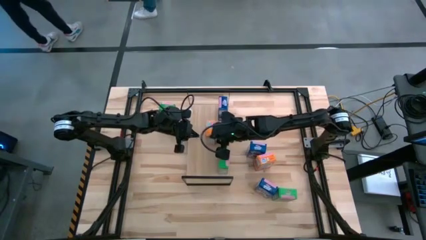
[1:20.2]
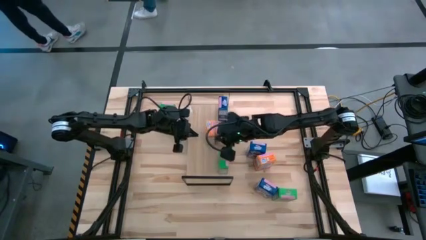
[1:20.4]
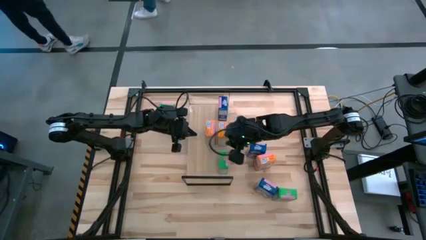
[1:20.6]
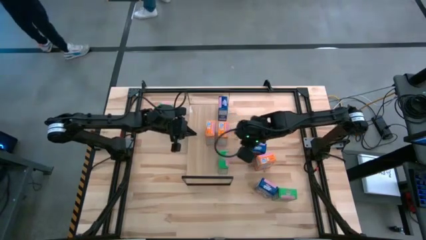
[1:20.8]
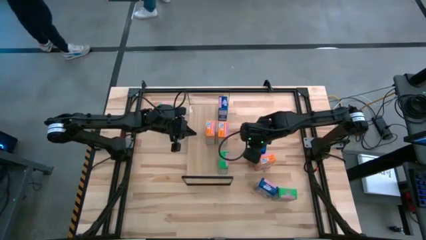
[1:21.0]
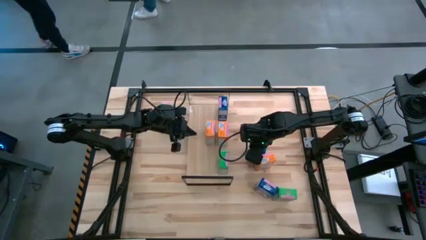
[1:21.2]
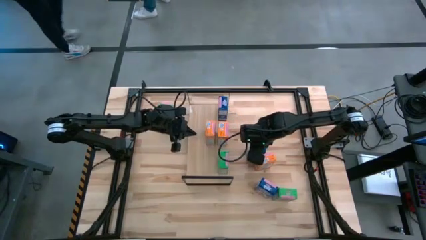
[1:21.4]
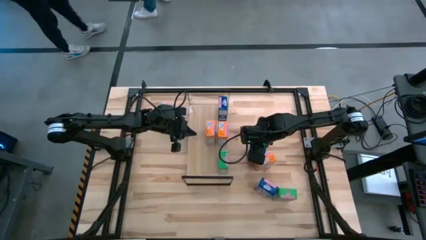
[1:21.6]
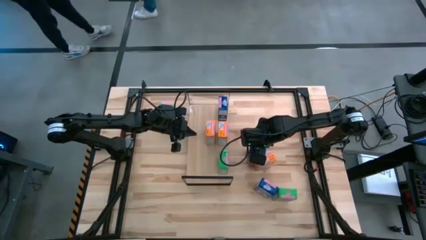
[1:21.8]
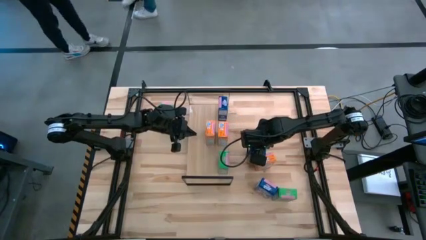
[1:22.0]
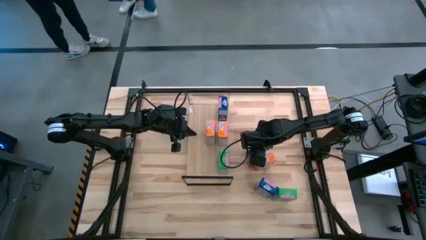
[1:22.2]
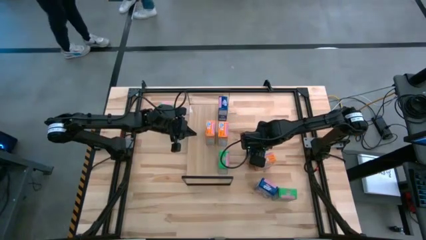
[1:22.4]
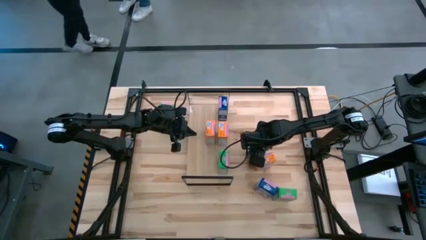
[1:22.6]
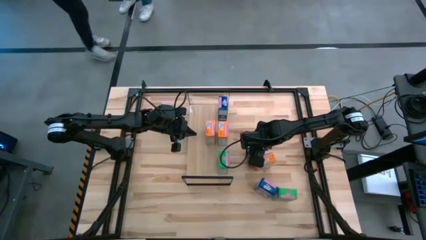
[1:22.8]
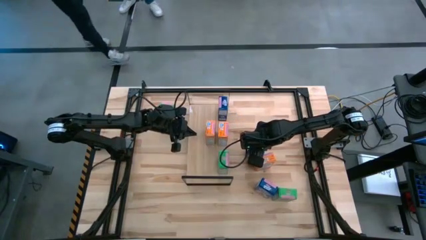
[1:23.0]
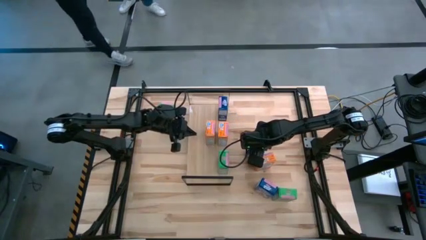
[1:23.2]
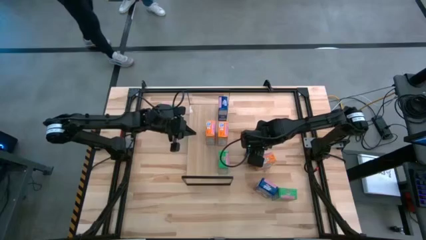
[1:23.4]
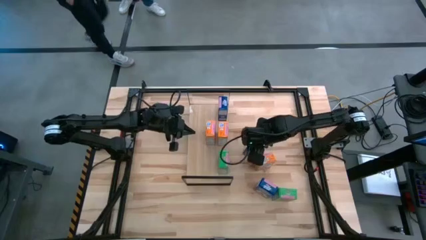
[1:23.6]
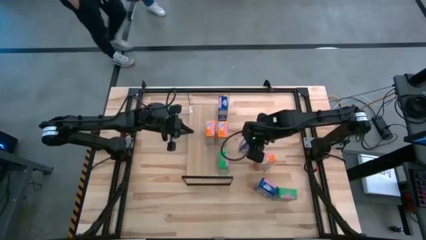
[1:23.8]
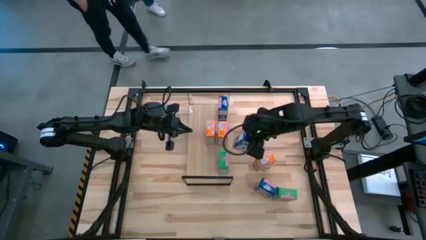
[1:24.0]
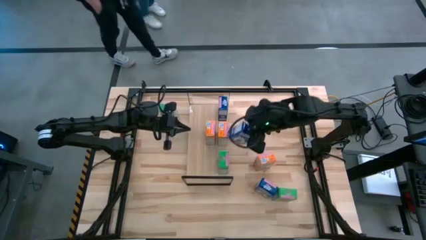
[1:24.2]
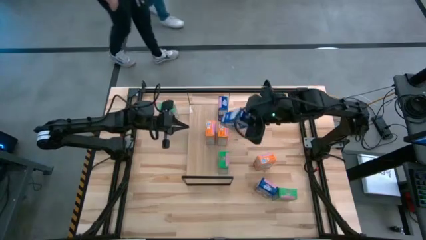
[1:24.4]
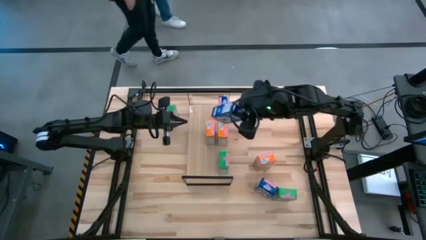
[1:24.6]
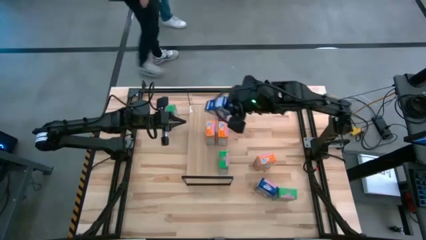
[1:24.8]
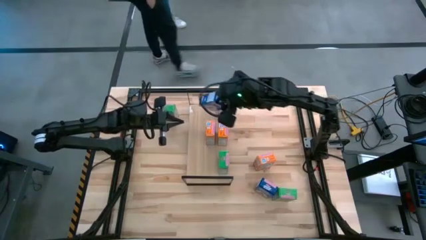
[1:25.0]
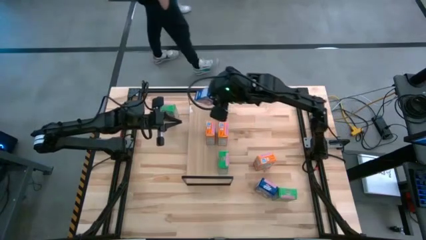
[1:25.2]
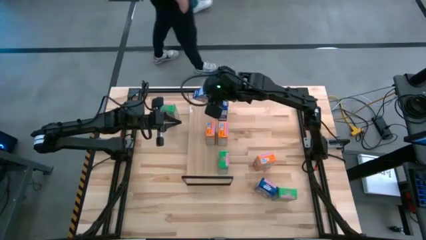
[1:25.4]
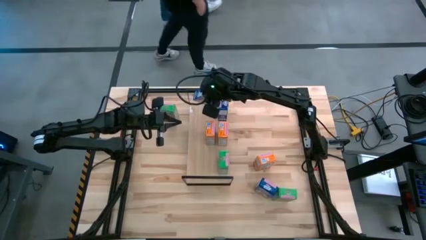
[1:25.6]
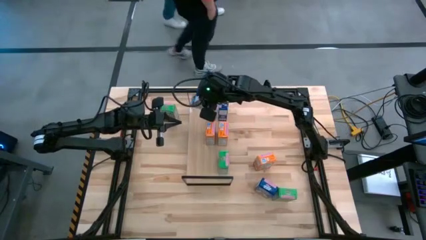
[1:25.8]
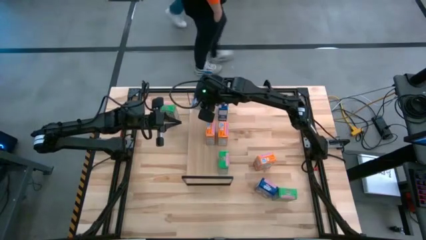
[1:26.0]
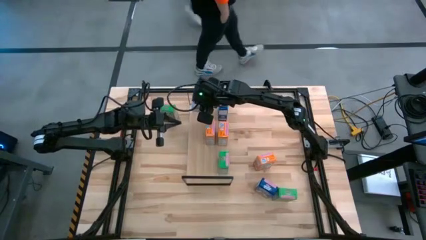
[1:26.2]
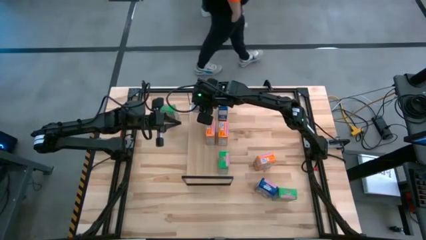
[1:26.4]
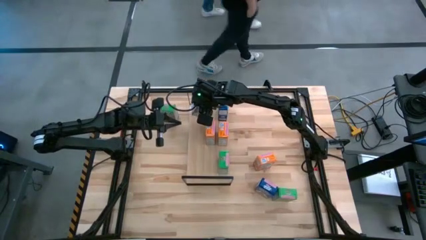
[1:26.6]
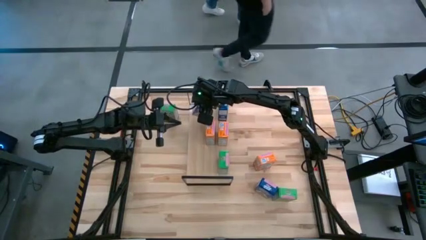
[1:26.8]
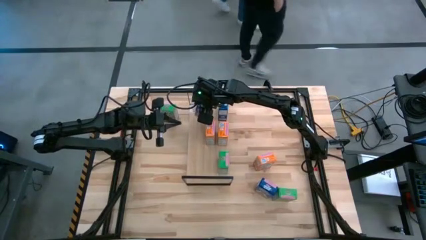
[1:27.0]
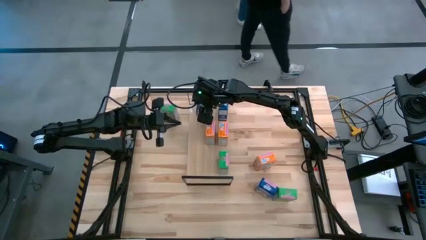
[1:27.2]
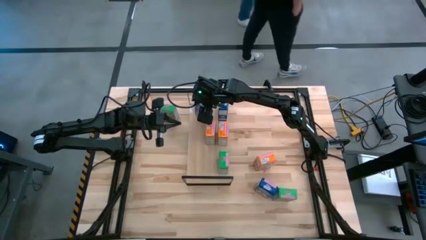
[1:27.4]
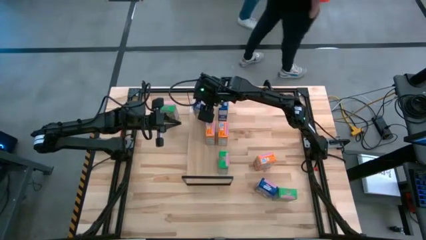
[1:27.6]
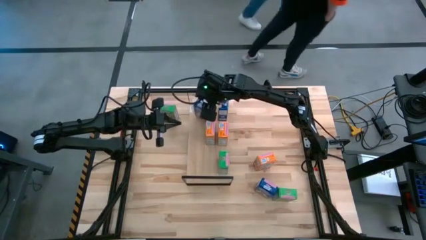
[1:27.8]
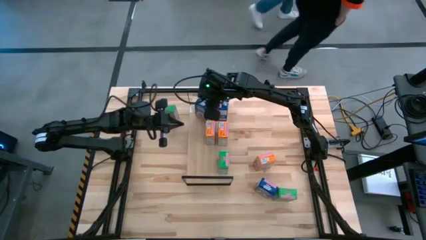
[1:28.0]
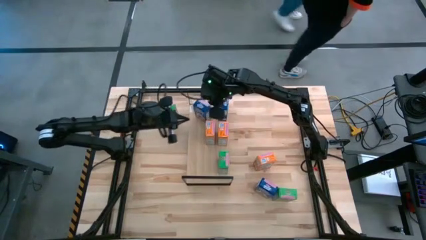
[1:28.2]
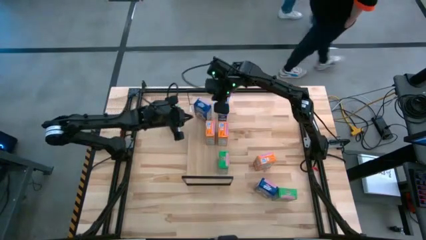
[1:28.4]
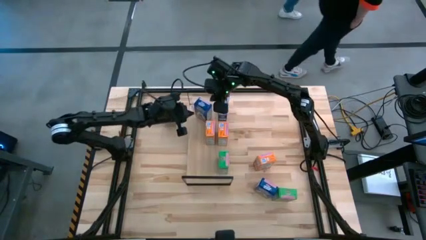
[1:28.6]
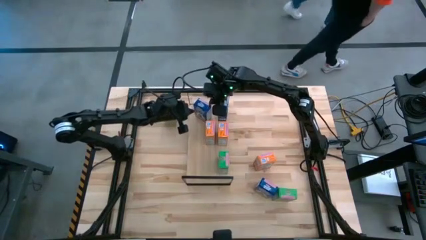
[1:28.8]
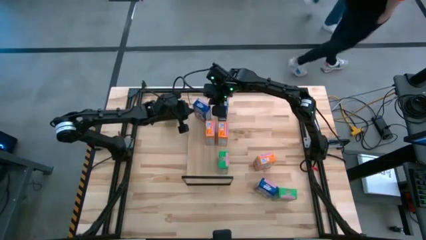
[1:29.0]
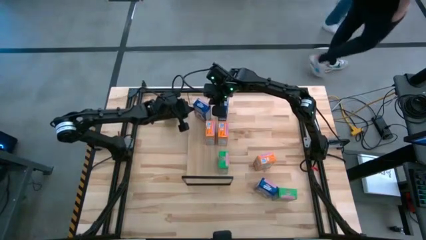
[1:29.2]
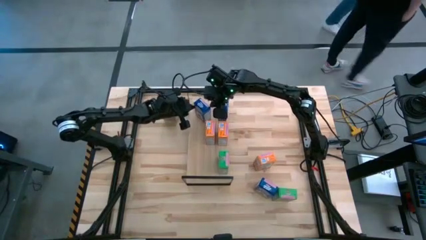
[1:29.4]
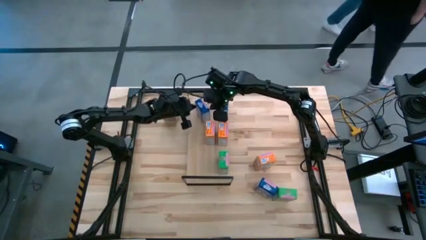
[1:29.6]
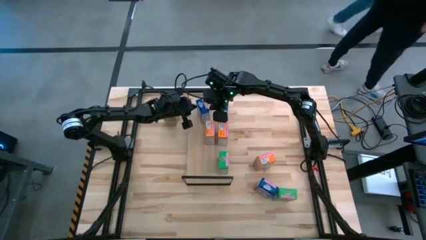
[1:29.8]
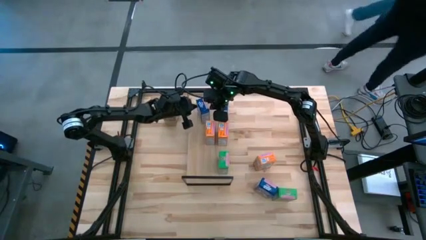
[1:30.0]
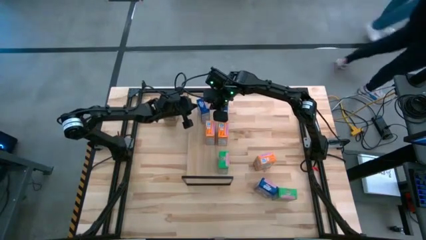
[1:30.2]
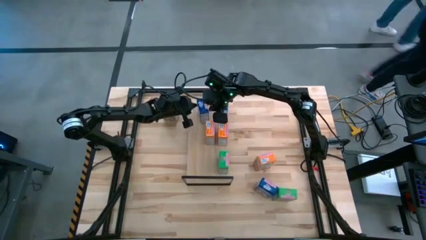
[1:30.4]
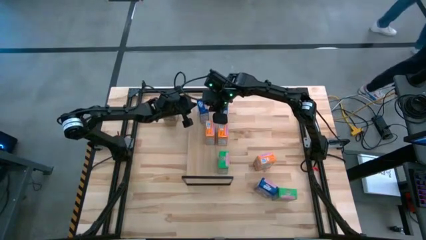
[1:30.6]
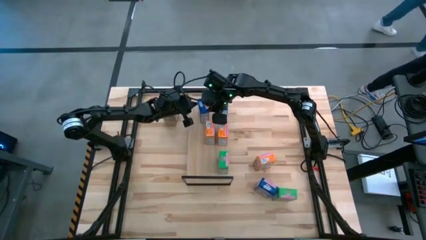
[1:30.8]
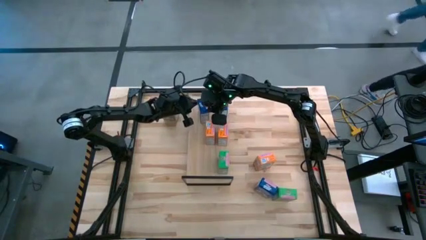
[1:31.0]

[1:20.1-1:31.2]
Task: Stack cereal on shelf
Put the top blue cereal box on the shelf aligned with the other blue cereal box

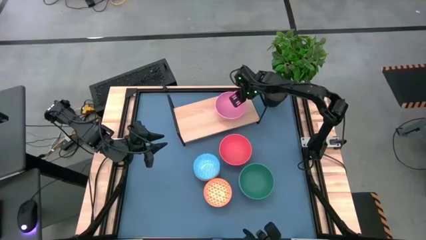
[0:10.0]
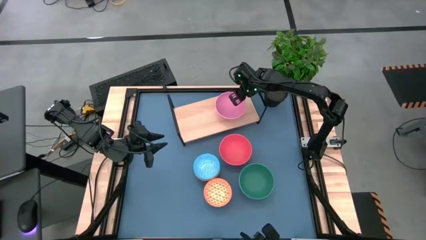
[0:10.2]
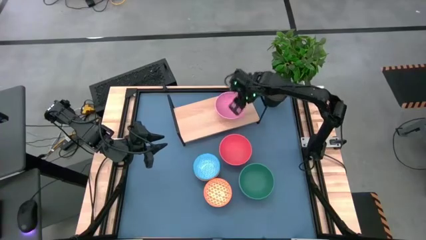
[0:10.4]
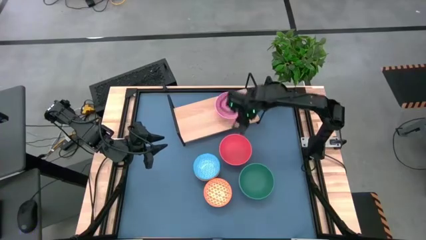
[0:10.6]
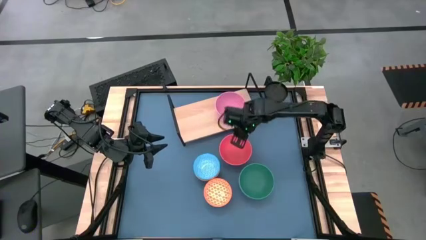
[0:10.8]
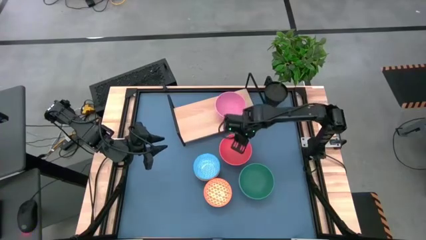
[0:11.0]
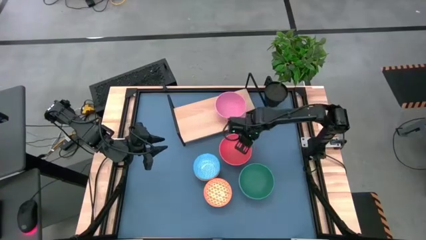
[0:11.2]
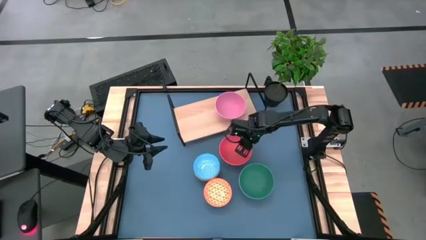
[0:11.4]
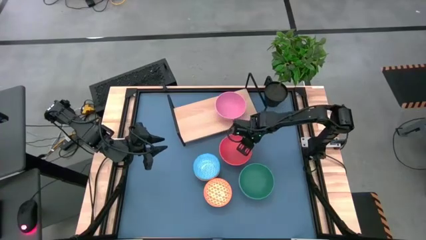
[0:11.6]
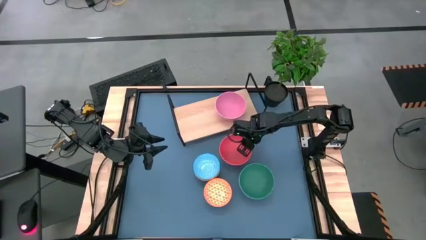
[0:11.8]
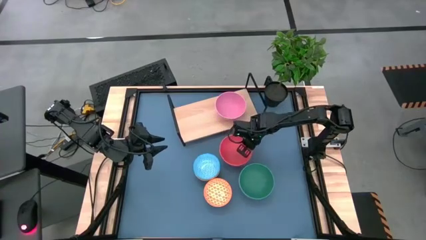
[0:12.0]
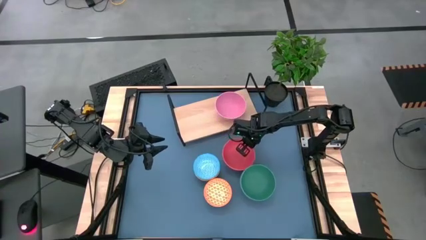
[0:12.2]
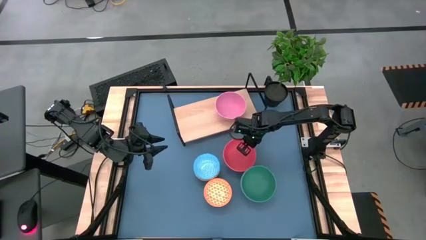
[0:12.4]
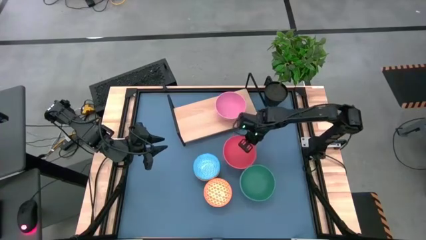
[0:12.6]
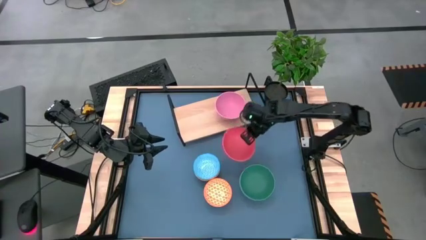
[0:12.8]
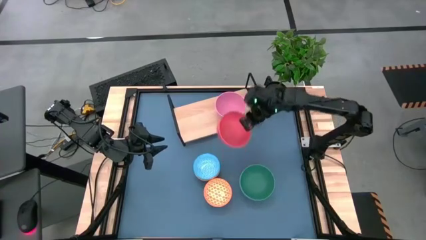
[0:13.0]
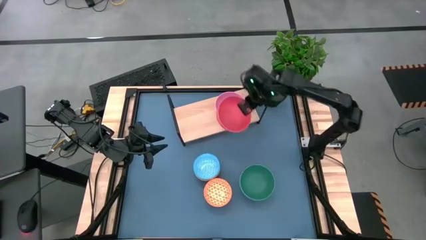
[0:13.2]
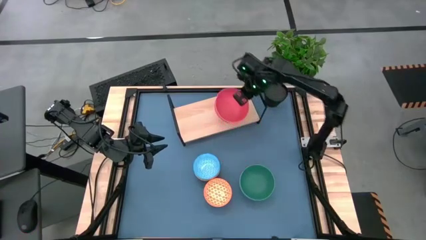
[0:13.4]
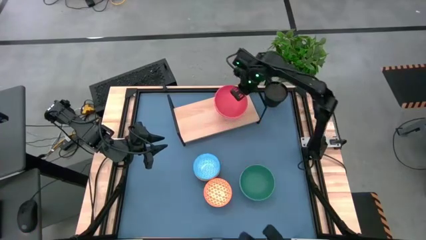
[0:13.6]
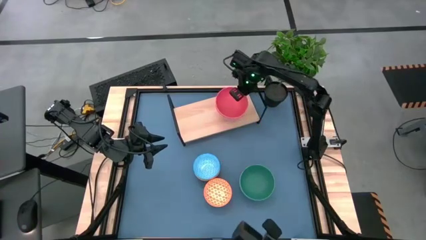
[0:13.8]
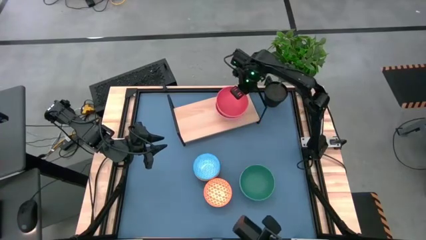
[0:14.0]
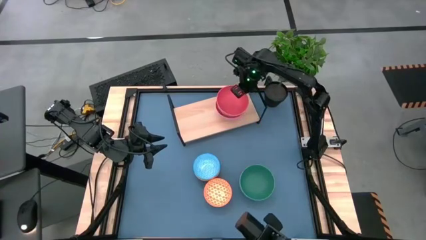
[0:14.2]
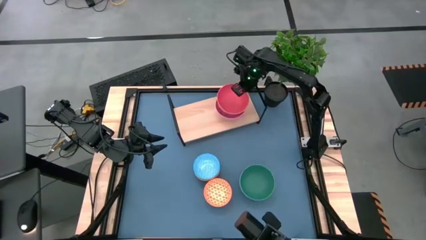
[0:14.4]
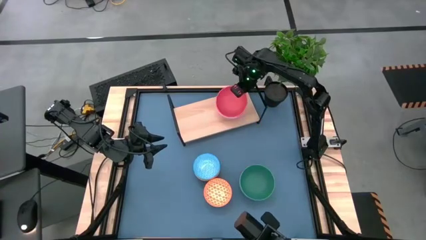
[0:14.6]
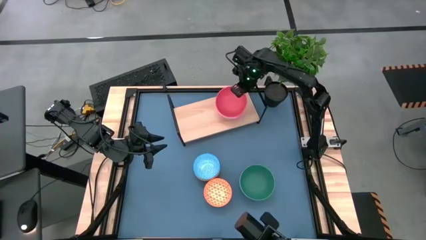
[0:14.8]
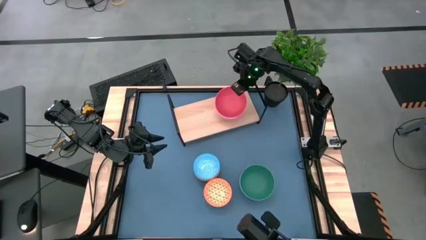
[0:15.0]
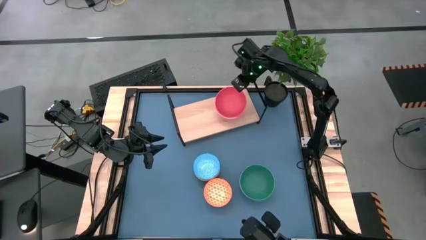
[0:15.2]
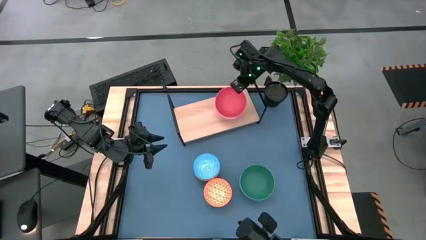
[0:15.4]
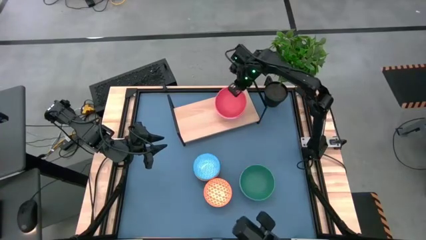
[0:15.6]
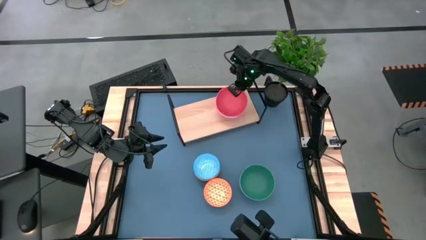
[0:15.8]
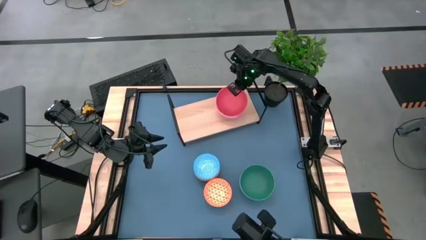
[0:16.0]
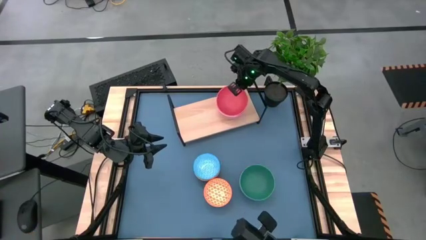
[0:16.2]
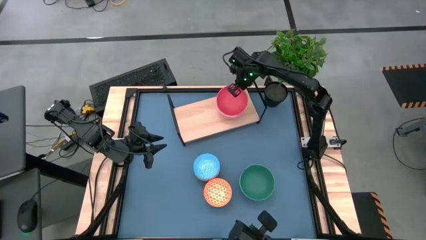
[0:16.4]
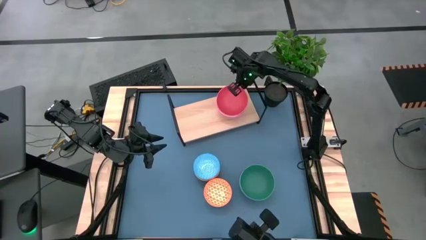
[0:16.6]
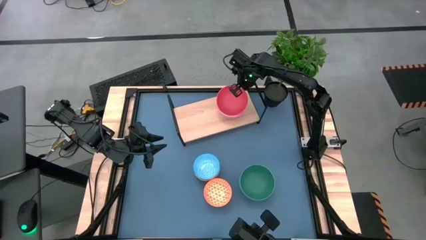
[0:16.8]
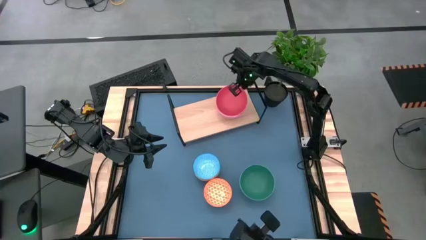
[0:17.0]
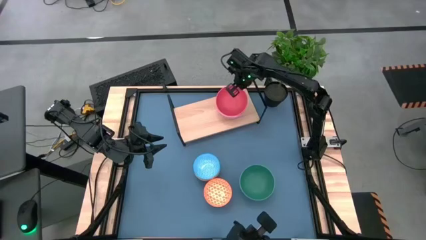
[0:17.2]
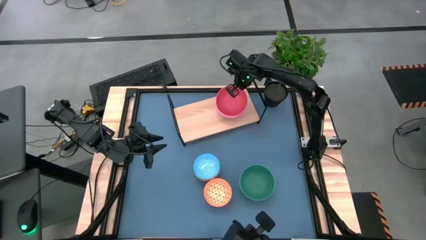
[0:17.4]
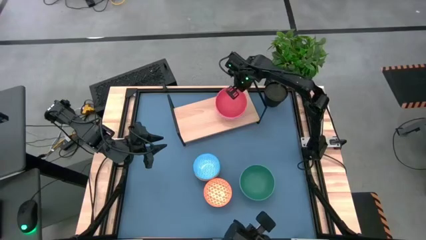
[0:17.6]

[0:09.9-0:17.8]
Task: Place and stack bowls onto a shelf
Stack the orange bowl on top of the pink bowl on the shelf
